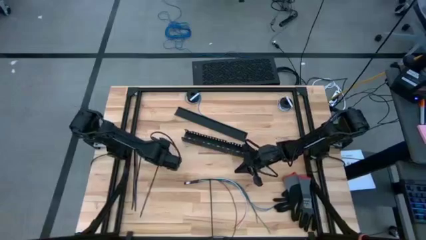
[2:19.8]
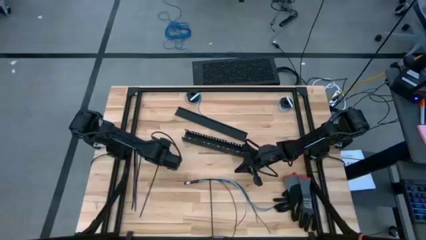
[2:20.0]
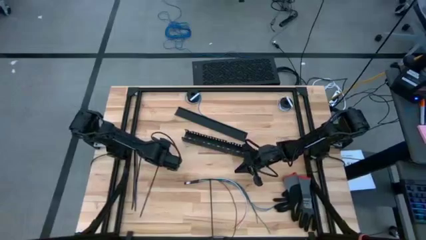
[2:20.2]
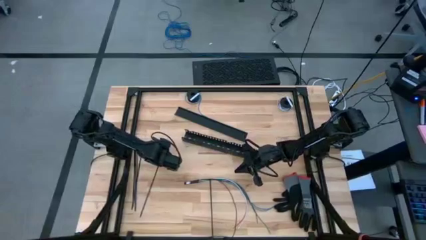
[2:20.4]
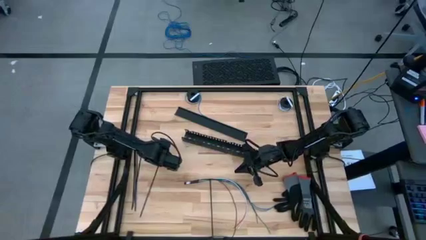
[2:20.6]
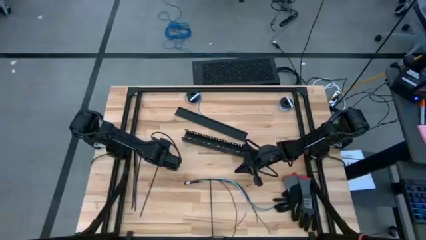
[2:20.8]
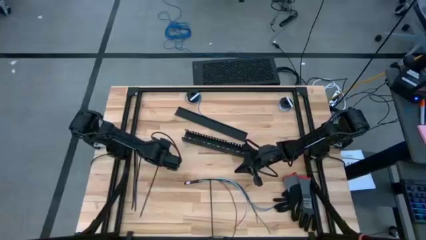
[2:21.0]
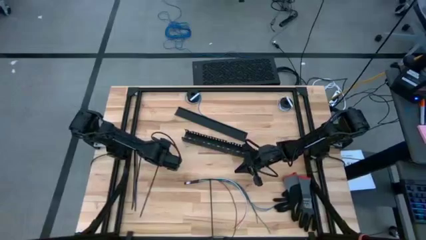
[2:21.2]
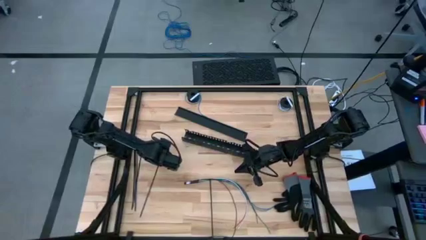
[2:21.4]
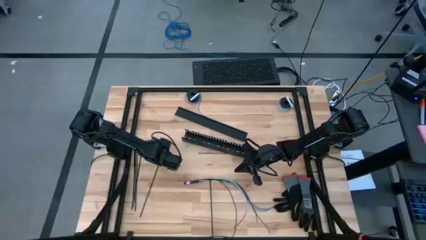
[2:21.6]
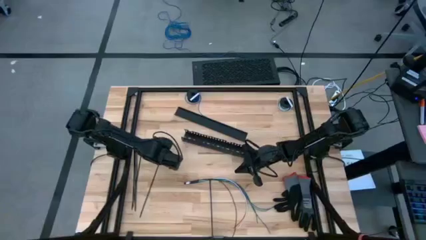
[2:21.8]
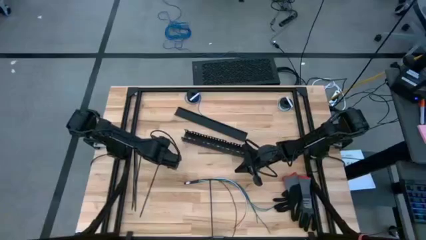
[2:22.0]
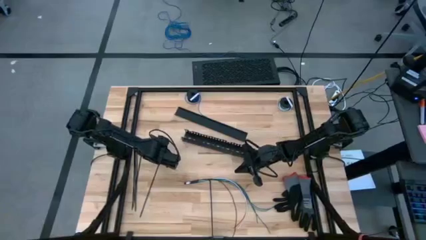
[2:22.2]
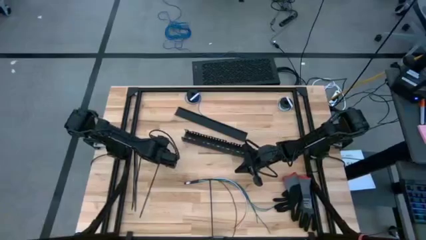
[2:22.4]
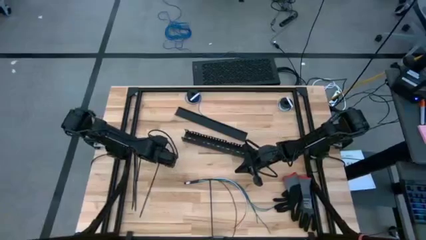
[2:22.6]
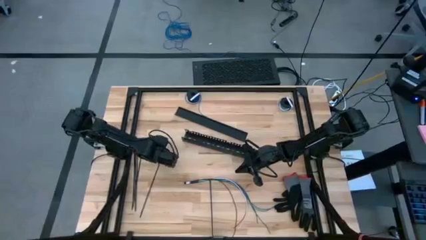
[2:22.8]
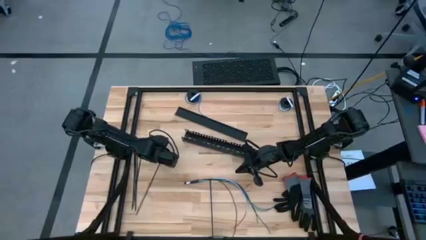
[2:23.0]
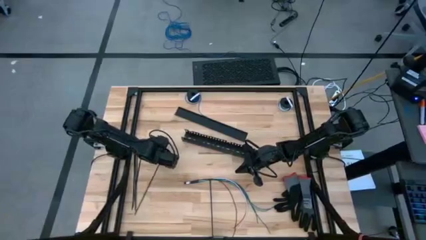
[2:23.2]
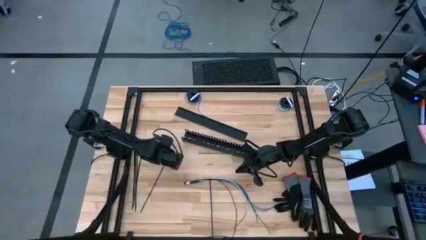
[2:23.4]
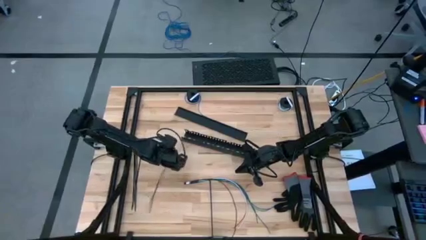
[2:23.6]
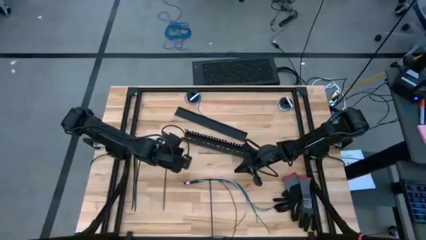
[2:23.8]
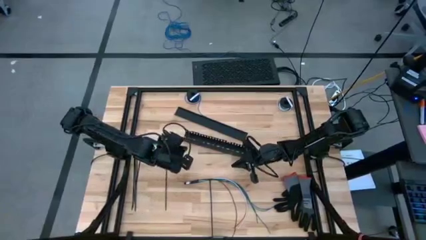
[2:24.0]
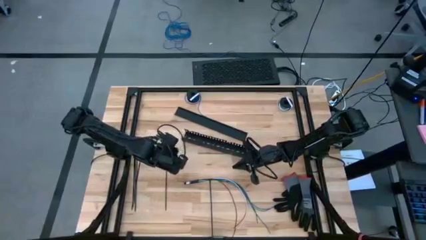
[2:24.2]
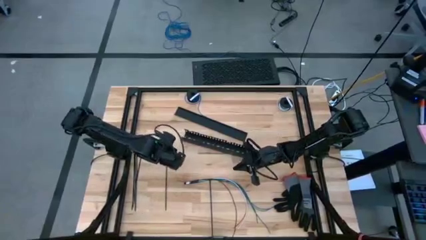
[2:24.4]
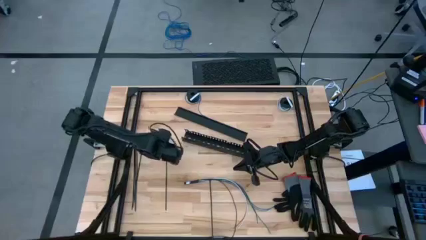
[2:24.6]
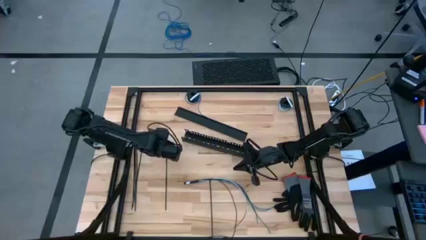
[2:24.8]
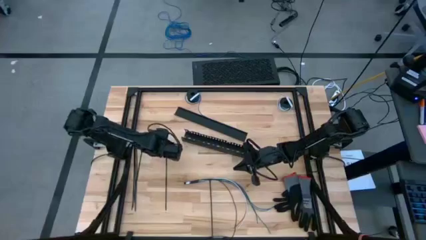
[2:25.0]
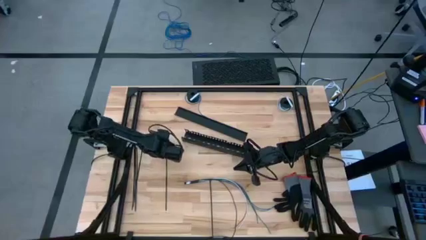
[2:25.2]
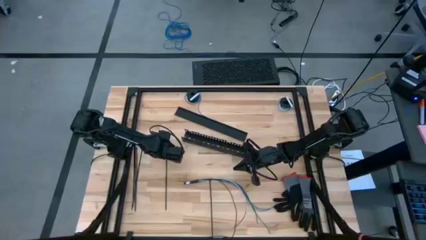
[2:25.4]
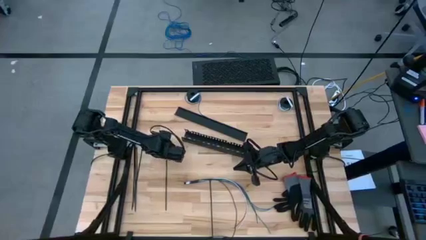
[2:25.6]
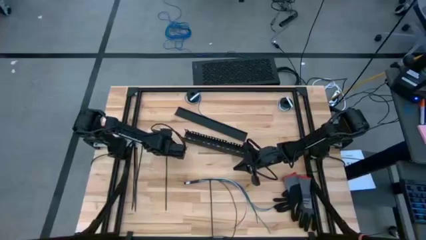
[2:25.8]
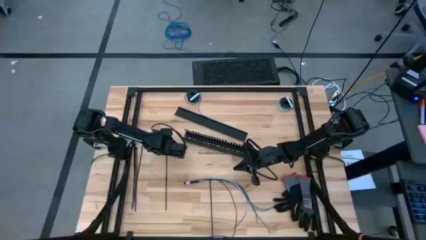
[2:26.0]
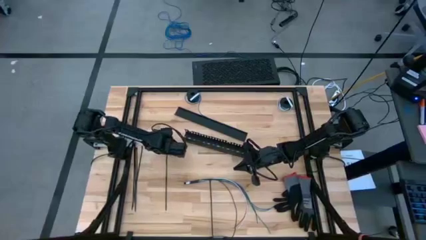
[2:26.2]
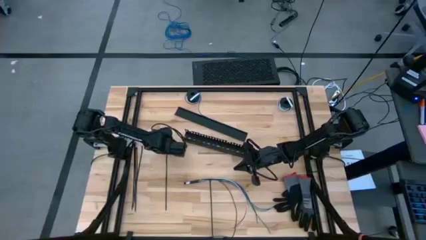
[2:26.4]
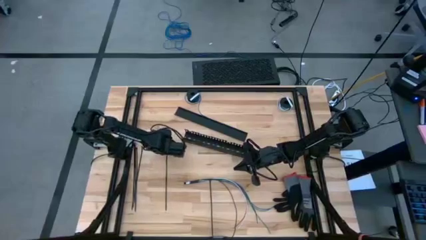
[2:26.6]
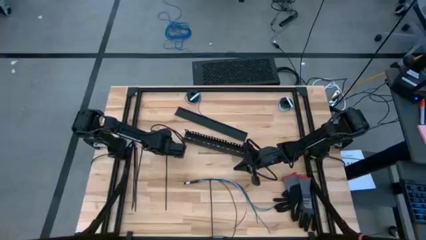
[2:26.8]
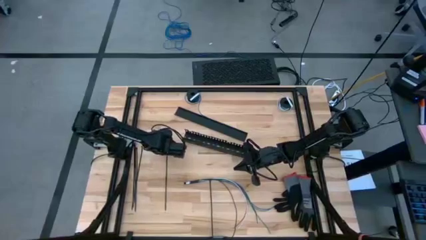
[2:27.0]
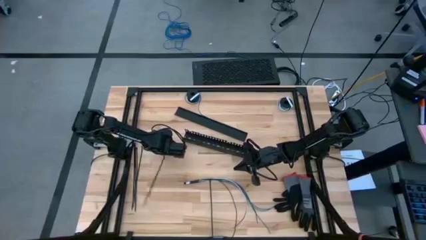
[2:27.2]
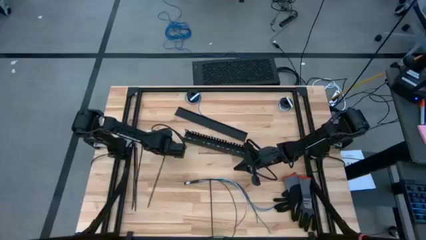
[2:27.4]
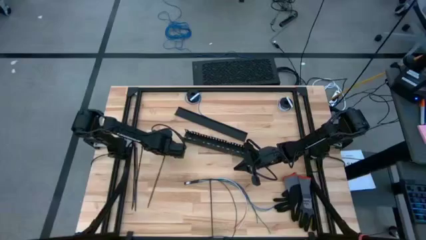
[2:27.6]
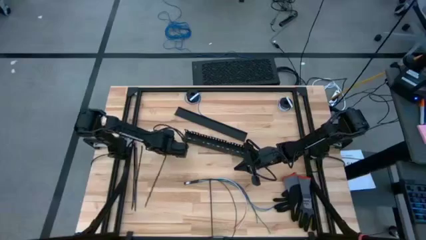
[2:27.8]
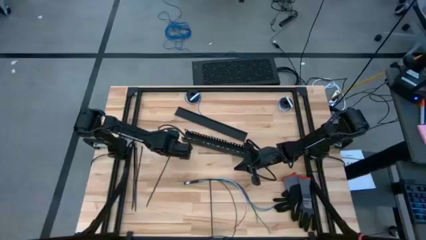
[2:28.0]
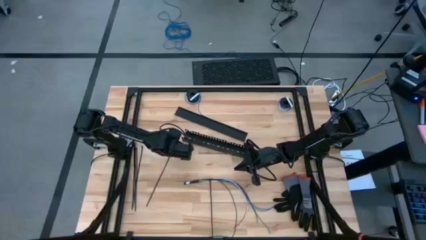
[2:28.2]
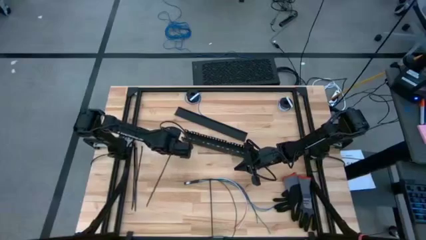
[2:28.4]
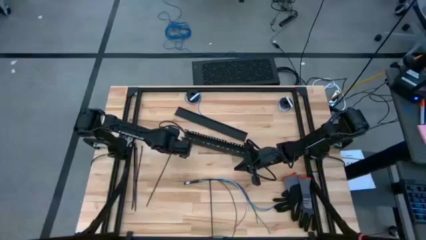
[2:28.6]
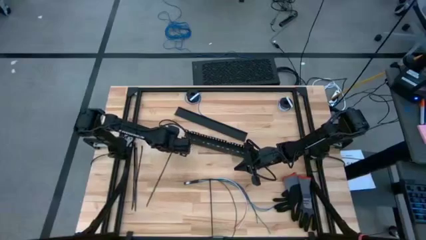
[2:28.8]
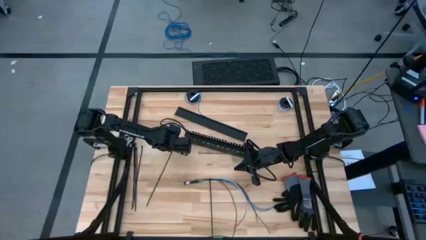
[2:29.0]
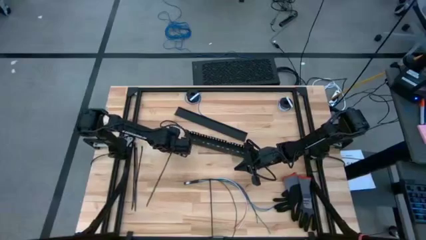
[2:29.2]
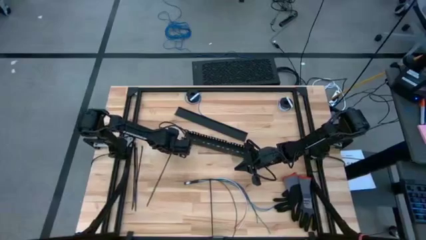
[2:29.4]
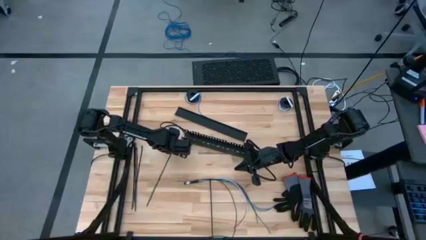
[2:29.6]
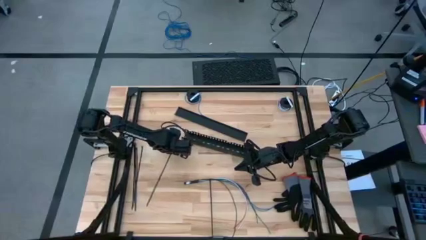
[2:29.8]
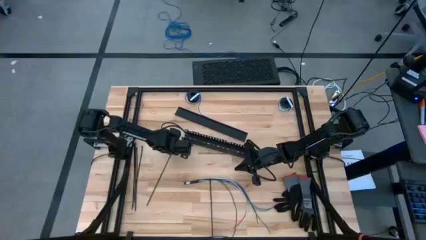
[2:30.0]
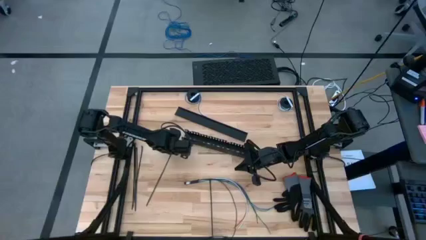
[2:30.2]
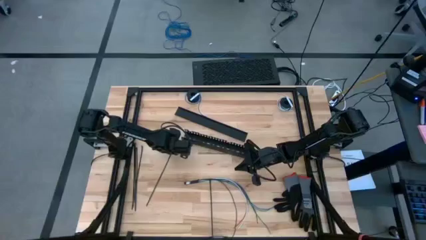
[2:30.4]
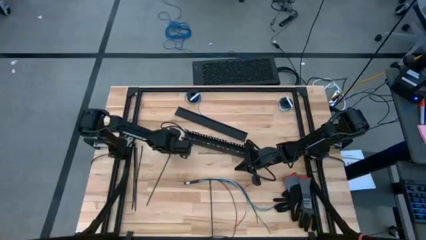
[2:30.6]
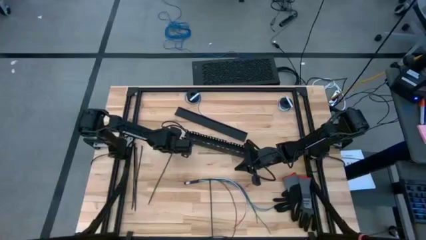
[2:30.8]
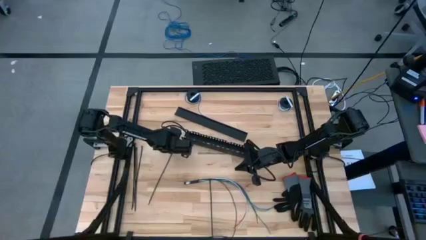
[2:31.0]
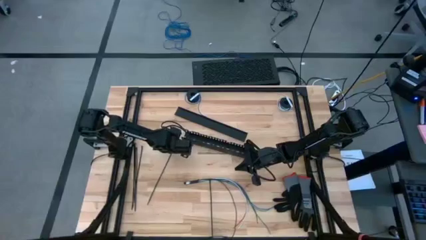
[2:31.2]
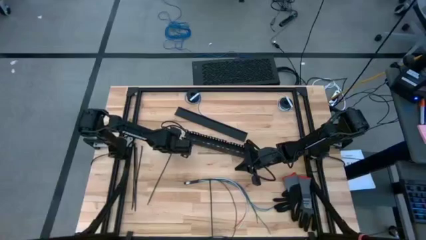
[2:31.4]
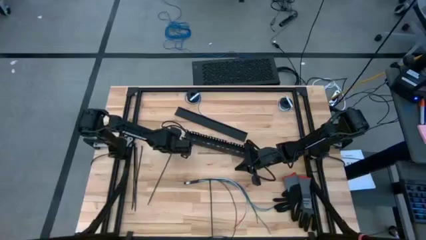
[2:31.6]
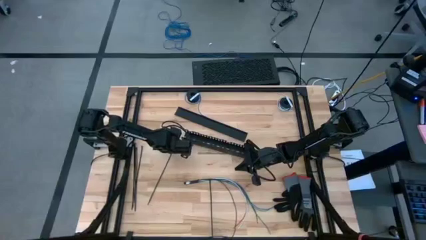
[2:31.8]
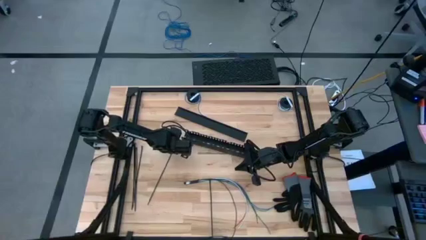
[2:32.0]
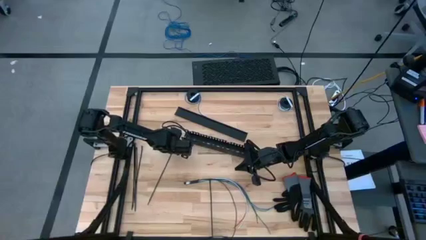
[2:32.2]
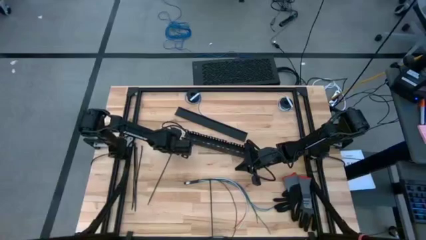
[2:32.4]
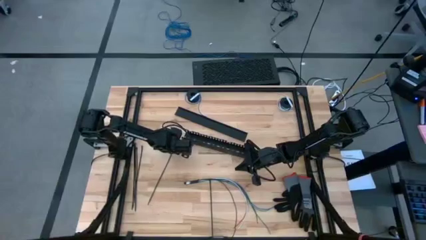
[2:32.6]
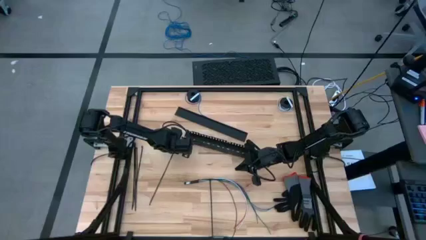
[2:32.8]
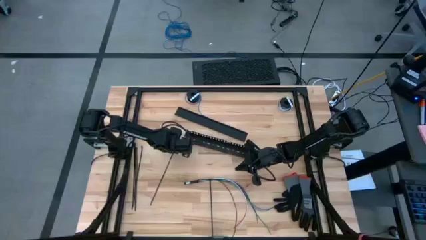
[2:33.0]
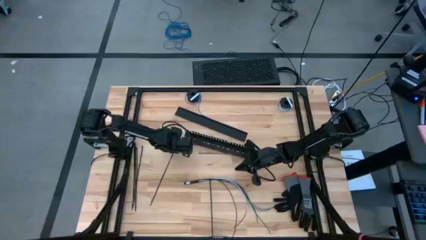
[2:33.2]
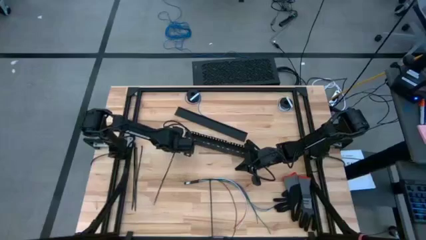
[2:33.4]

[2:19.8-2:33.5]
Task: Ziptie cables
Wrap the cable wires with the black zip tie

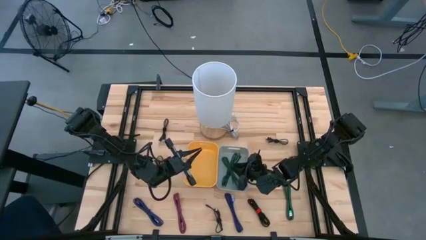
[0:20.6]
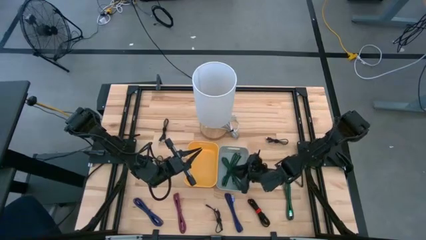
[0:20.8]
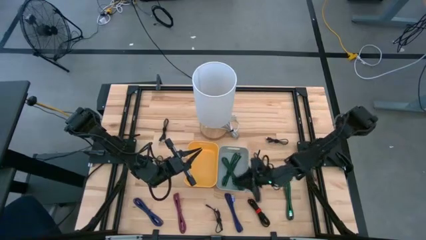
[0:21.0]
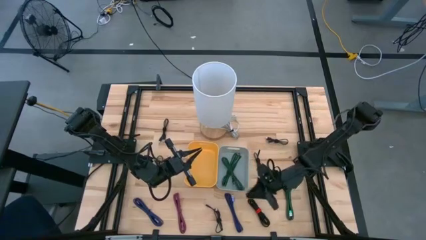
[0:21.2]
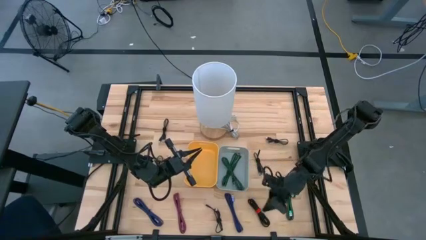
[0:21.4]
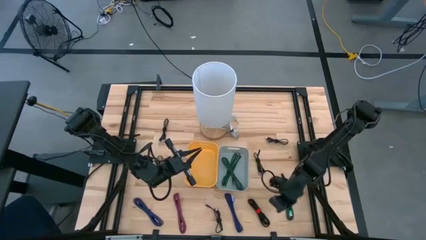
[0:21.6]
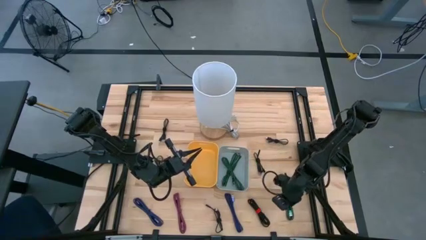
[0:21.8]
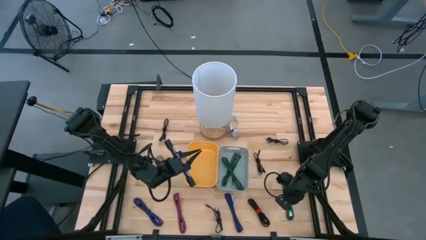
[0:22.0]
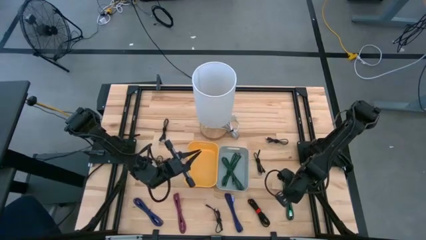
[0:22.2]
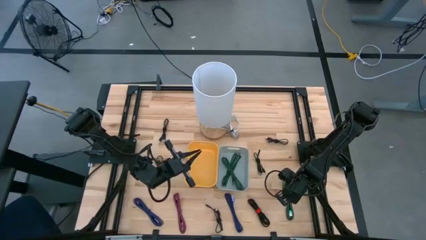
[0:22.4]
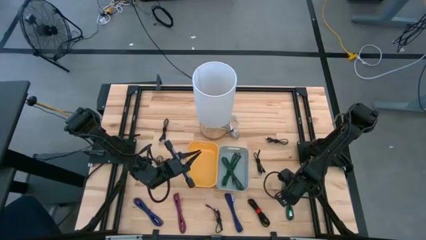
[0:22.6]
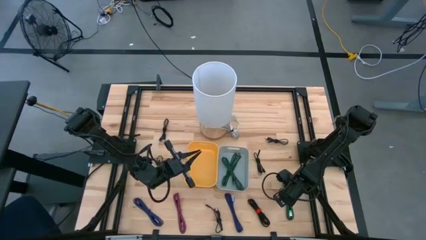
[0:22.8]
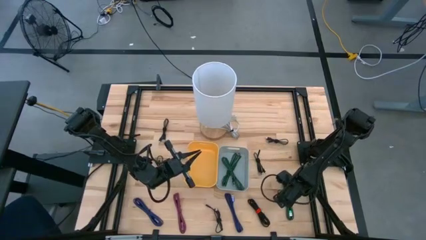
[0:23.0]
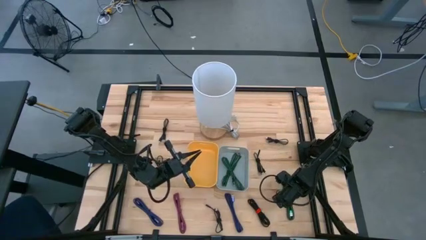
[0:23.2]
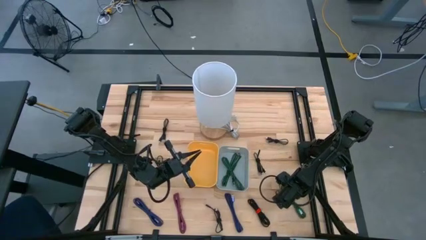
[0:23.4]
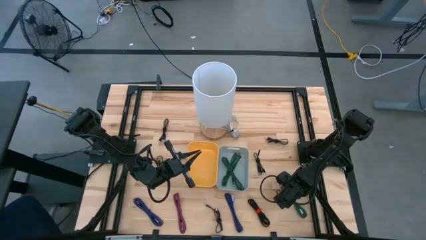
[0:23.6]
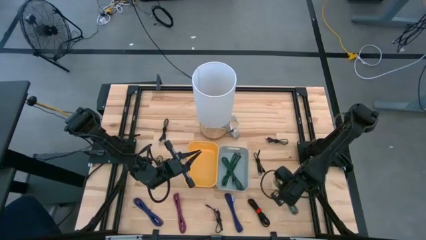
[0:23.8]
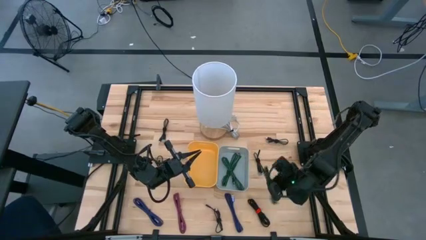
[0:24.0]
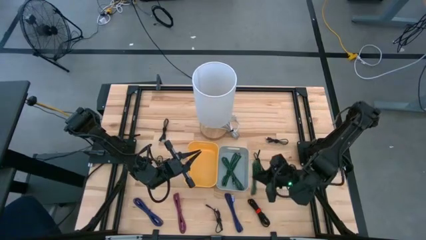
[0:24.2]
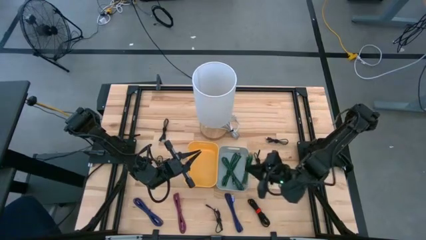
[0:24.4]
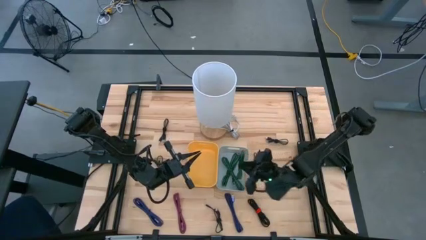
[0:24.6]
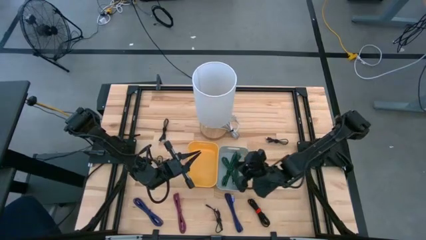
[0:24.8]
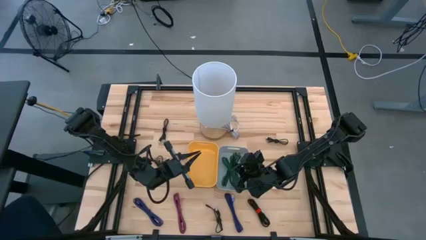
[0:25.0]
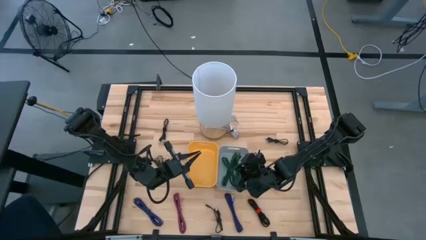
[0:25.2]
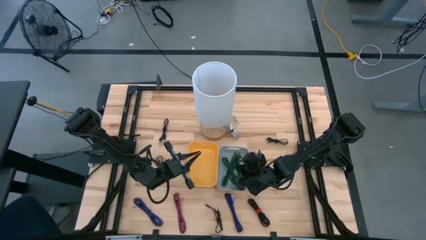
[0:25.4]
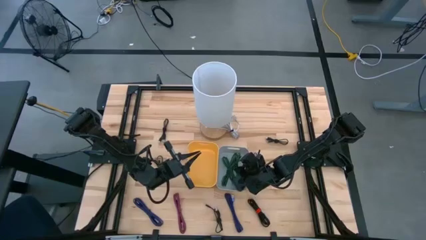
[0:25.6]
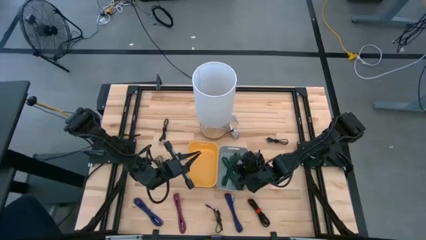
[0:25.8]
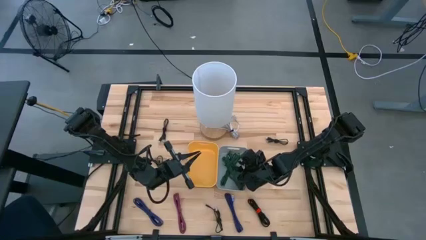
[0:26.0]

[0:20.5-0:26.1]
Task: Pick & Place USB Port
Put the green and black charger cable into the gray bin
